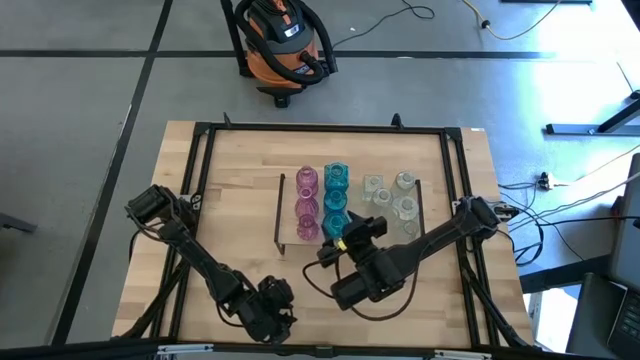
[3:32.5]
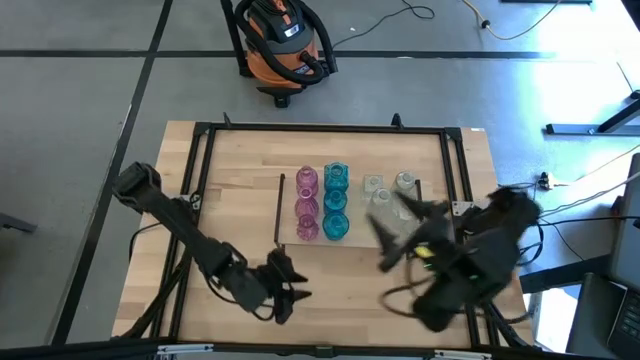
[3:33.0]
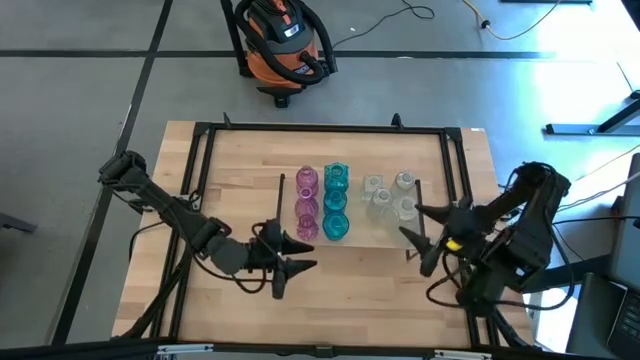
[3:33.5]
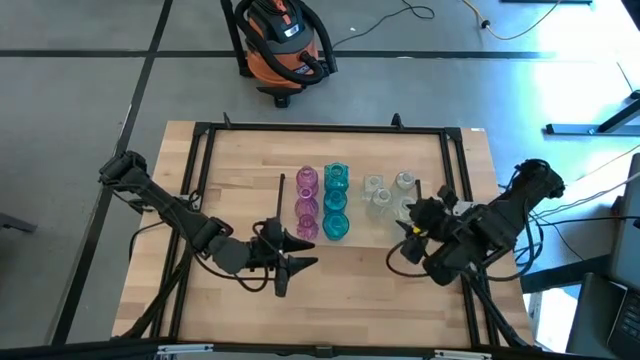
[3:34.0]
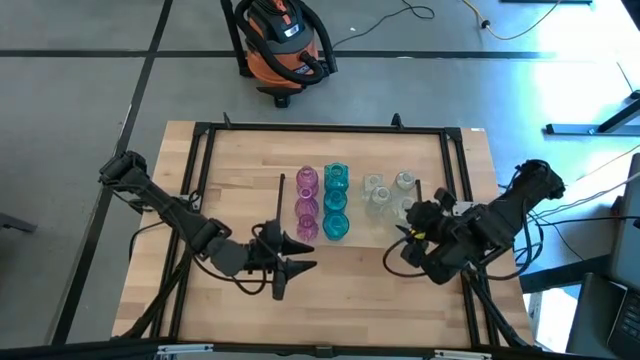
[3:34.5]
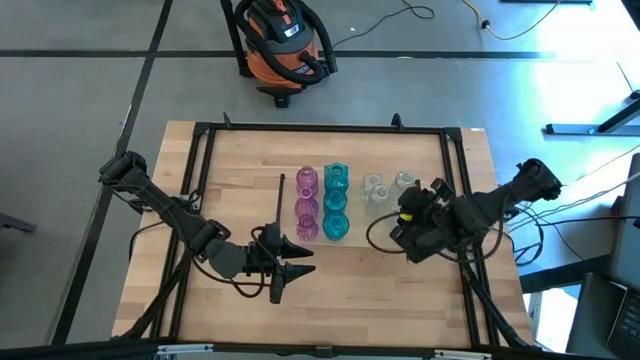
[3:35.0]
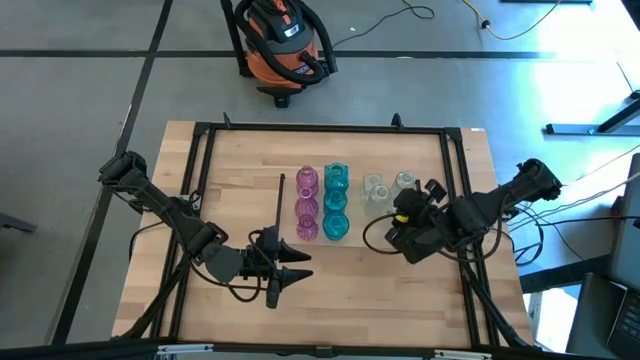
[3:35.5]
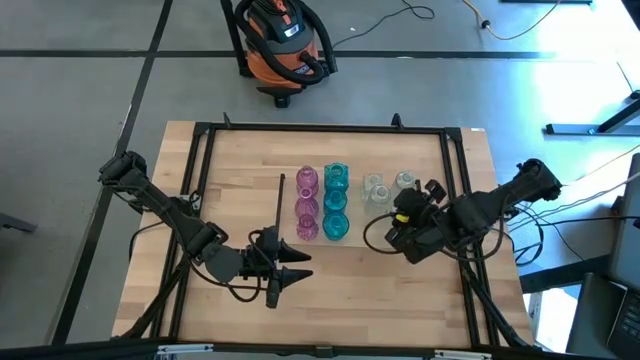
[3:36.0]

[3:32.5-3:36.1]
Task: sort vases onto shelf
Adjust the transparent vase on the shelf

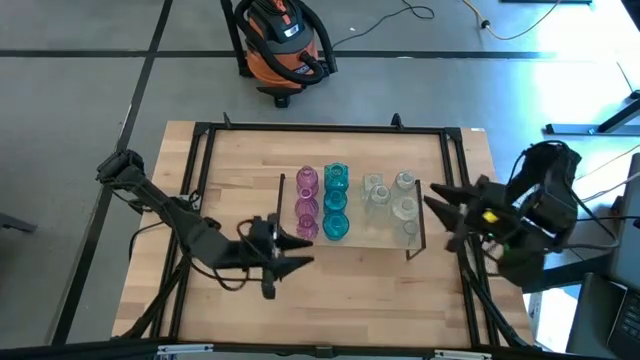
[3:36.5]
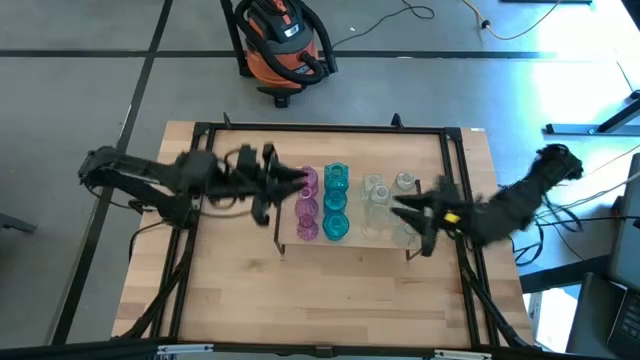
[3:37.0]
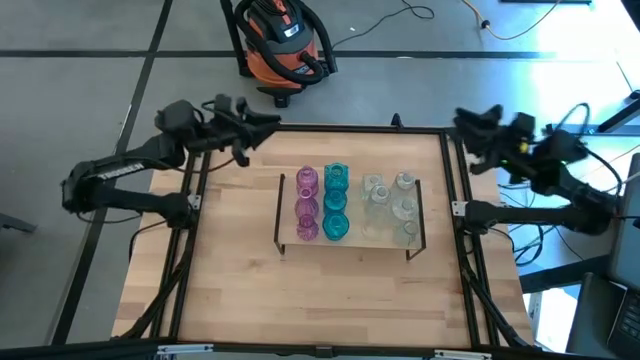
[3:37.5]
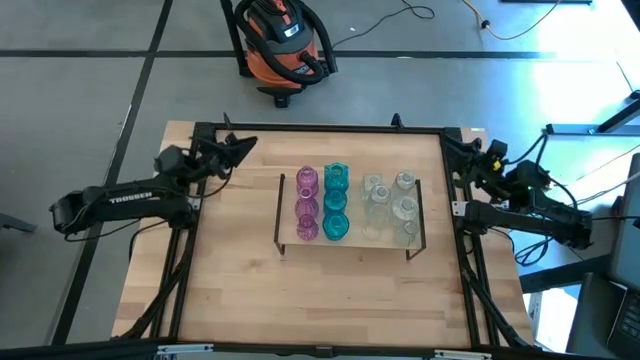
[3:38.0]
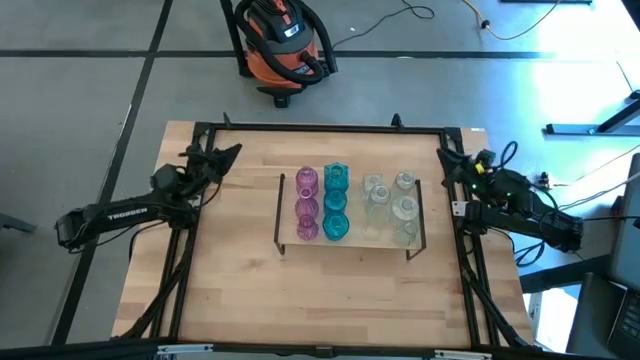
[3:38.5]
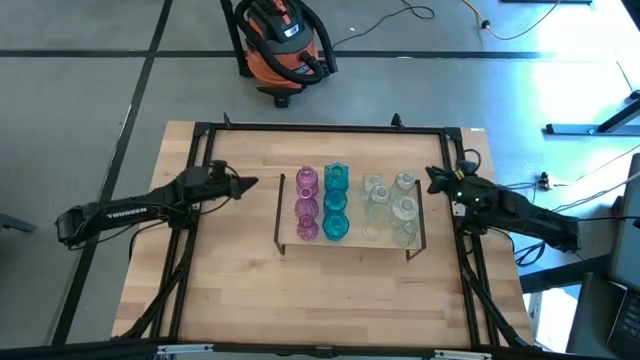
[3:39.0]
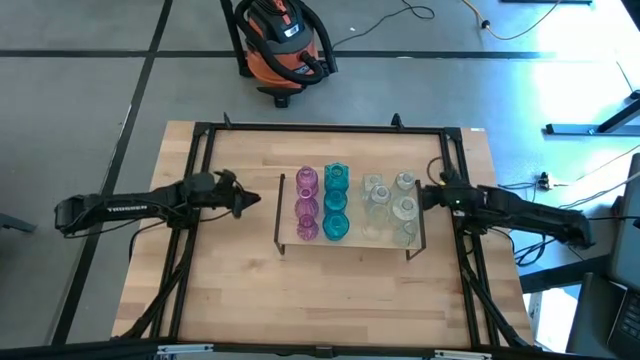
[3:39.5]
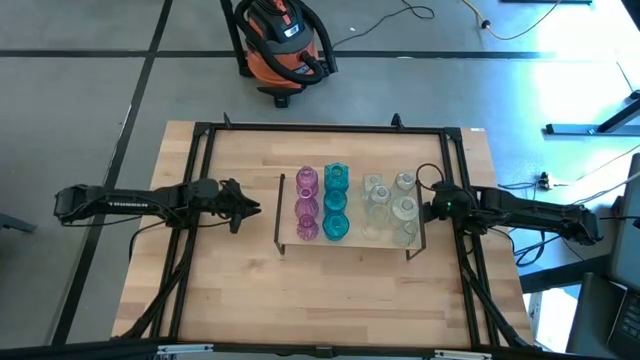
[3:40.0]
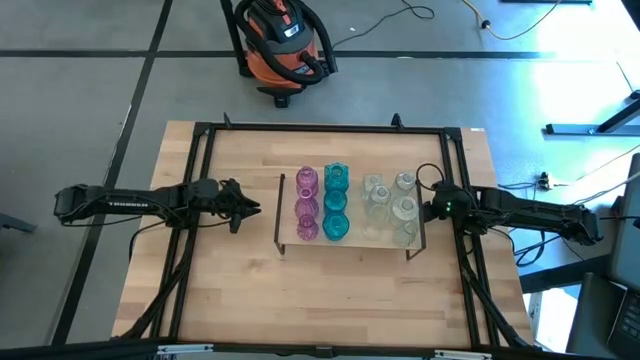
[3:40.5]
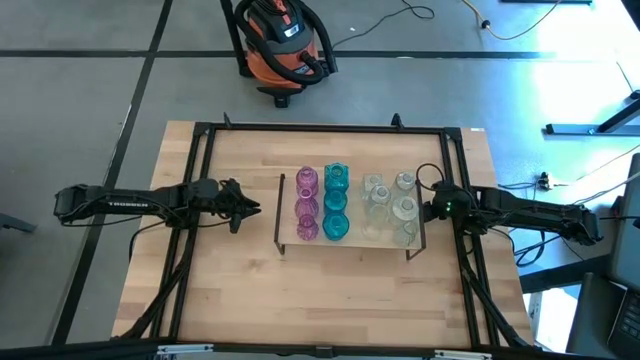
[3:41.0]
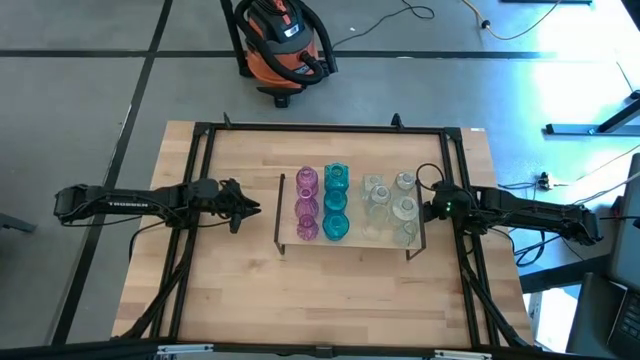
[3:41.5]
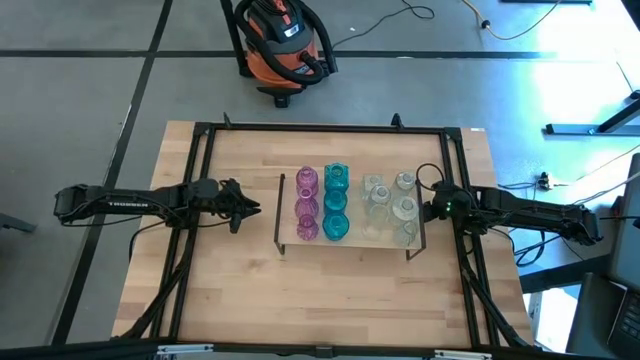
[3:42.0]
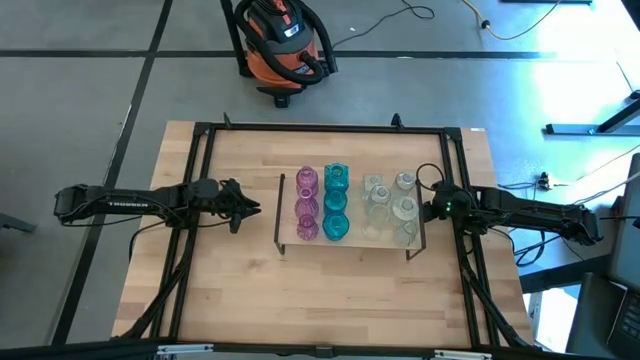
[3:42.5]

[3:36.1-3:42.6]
Return to Home Position

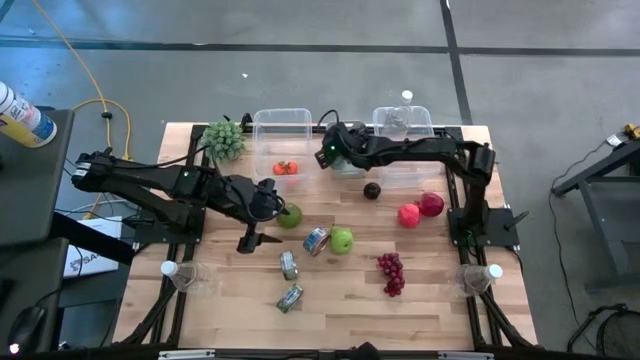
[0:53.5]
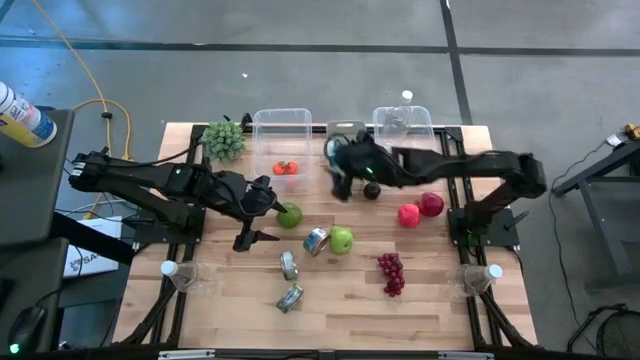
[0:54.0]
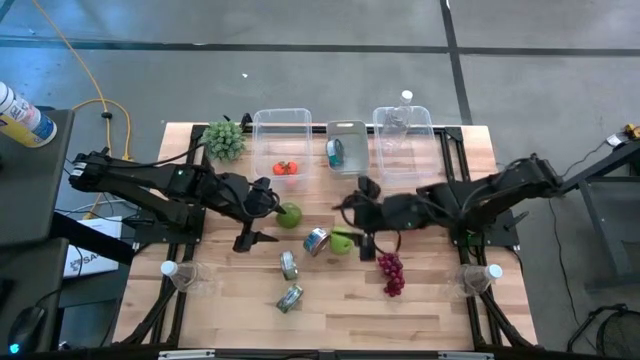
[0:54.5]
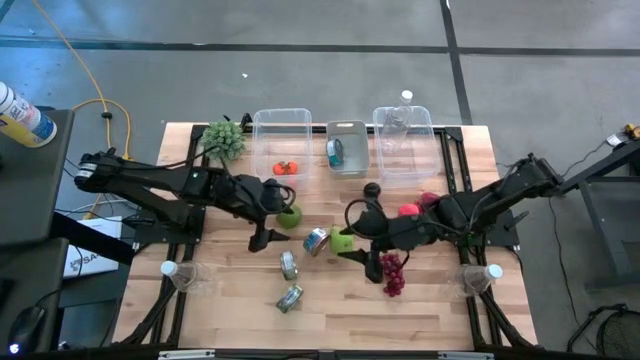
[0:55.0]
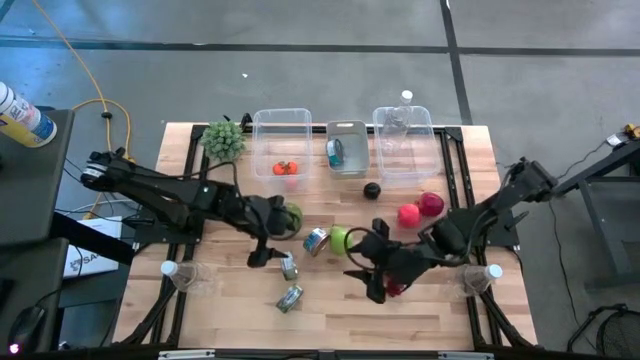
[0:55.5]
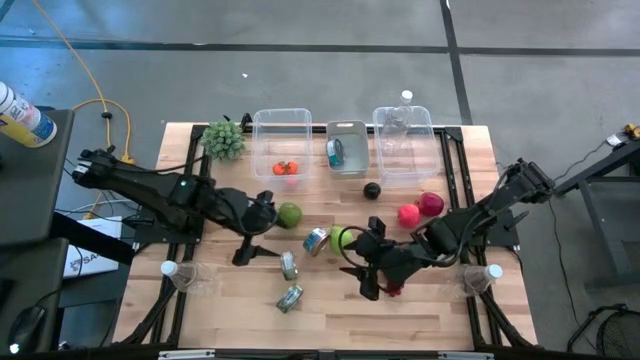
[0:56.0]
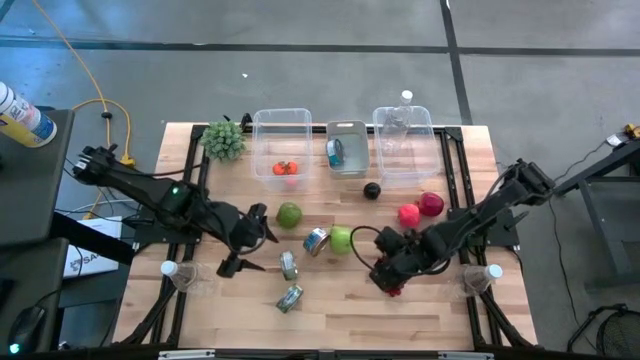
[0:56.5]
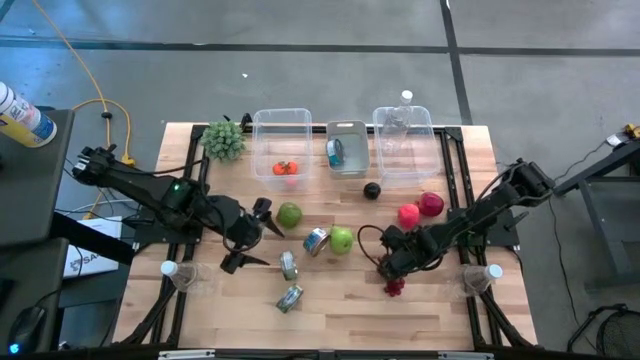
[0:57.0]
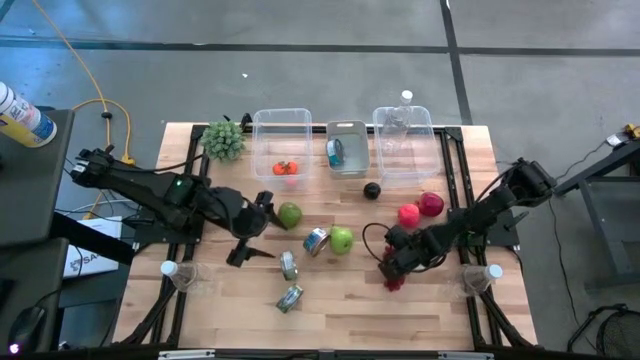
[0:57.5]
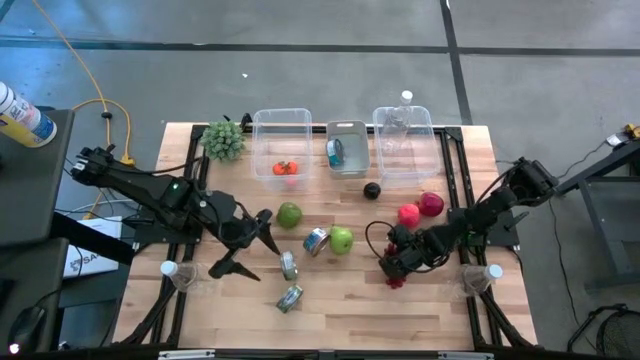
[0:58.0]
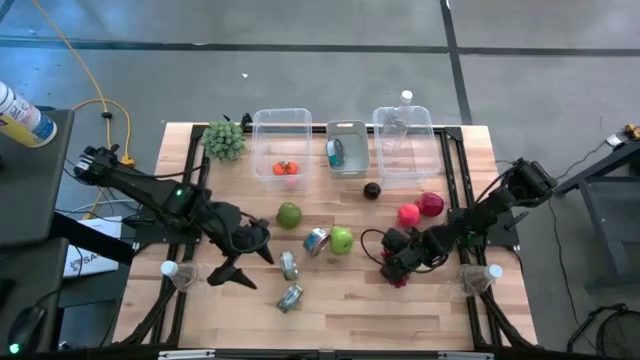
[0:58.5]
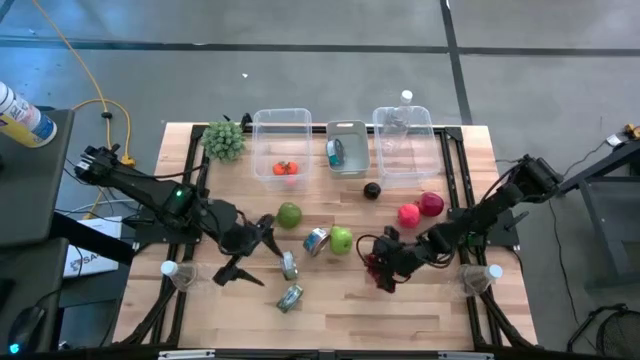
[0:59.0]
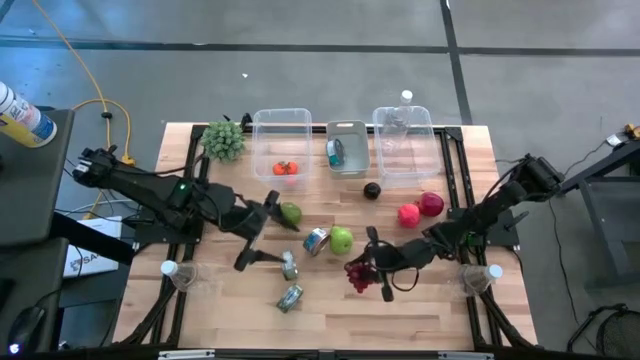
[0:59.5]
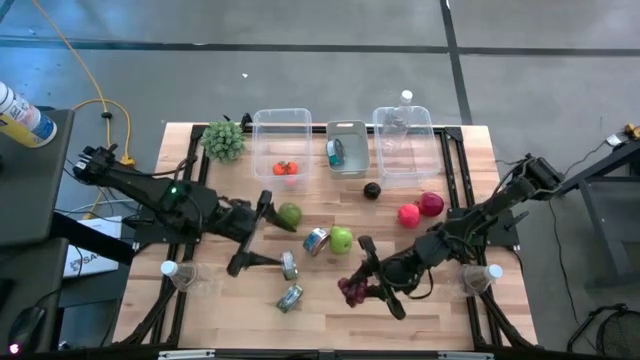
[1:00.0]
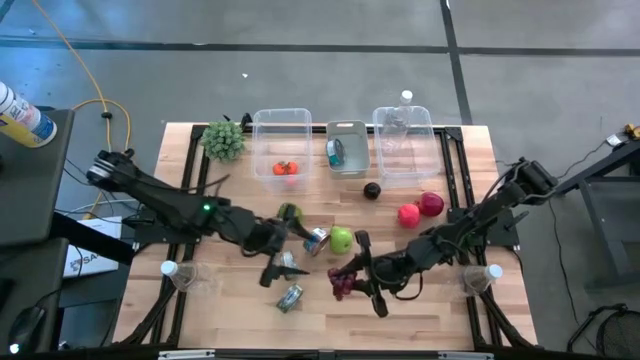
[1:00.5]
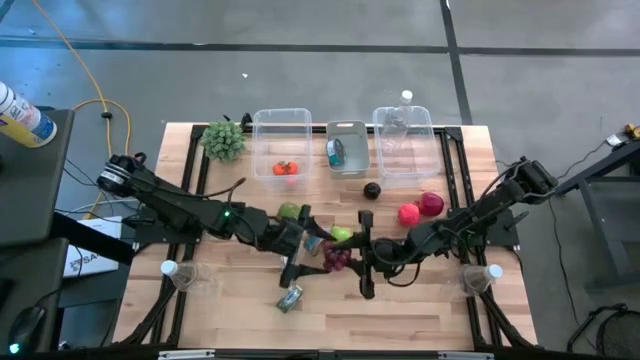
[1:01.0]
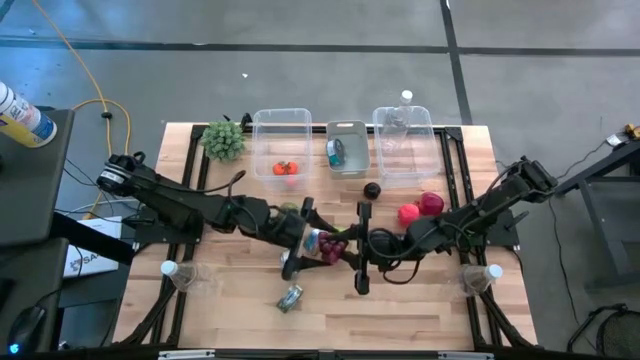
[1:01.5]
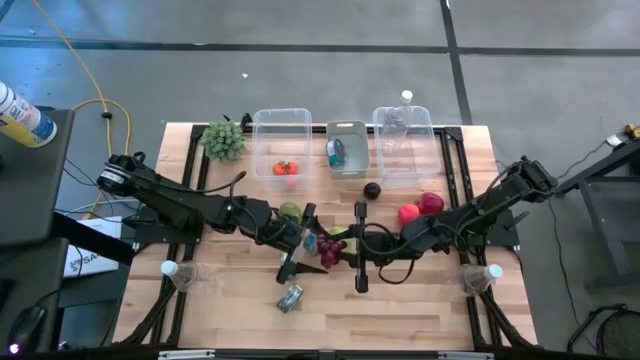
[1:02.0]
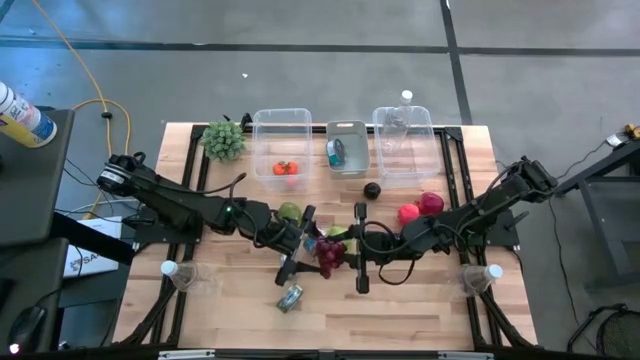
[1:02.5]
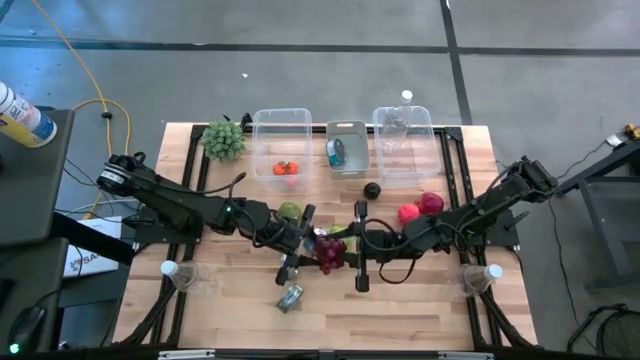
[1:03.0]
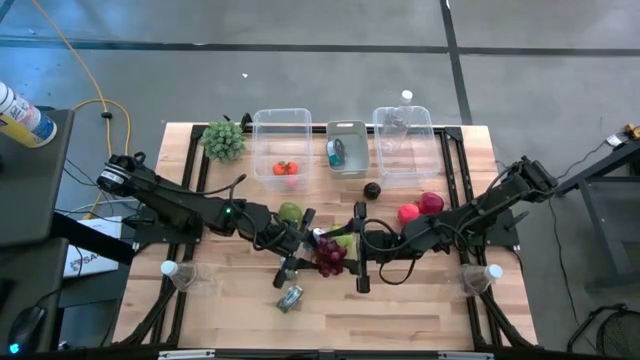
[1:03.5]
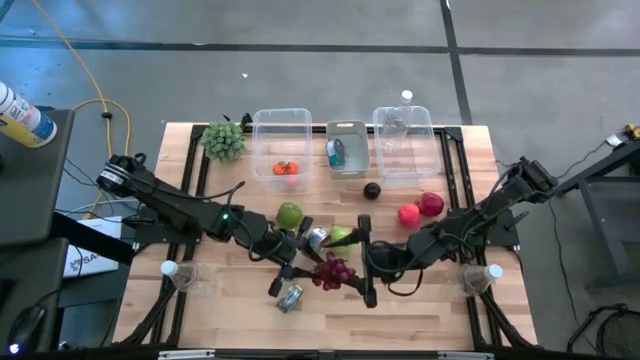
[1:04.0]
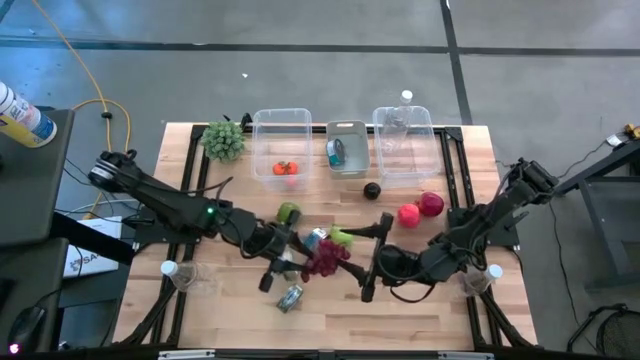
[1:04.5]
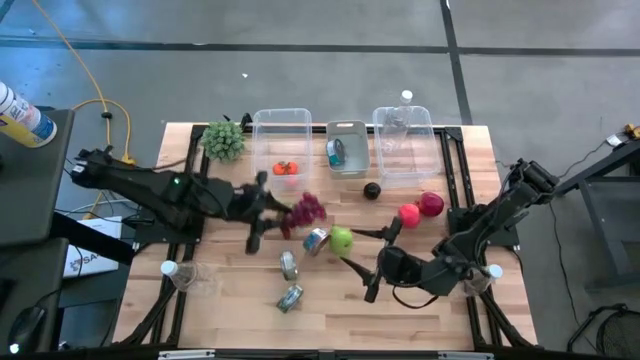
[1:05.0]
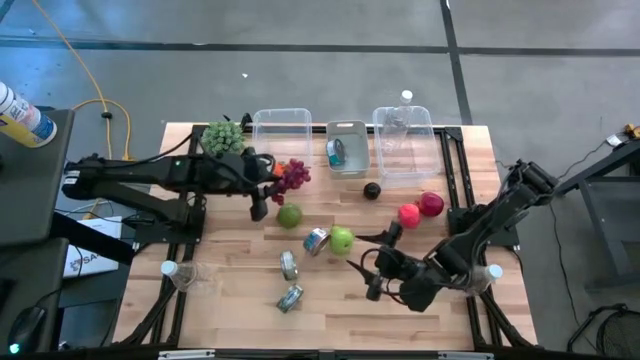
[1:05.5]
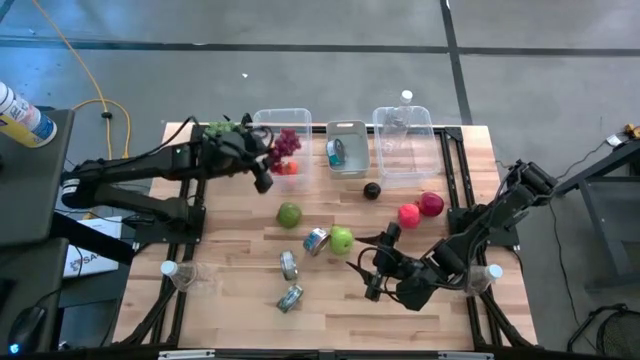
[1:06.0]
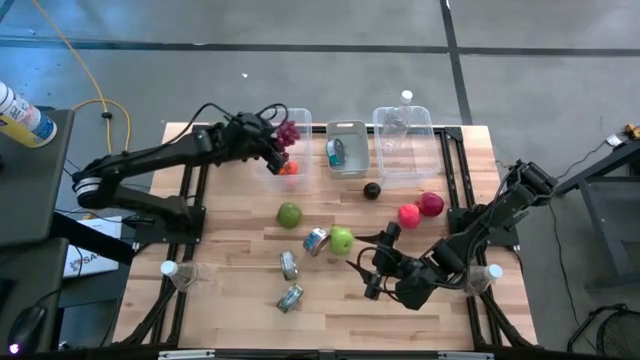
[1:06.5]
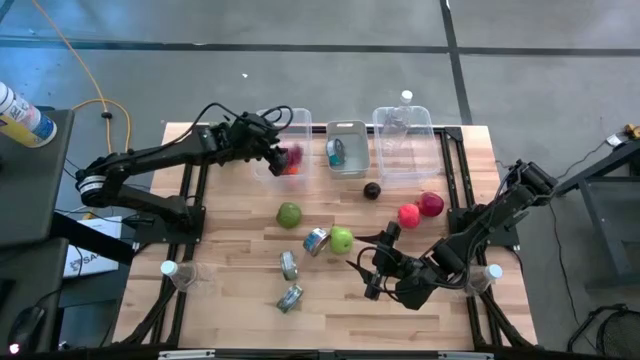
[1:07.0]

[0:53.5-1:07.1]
Task: Pick & Place Food Item
Put the grapes into the left transparent bin
